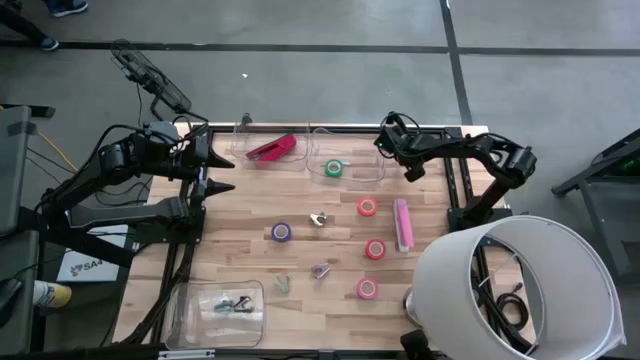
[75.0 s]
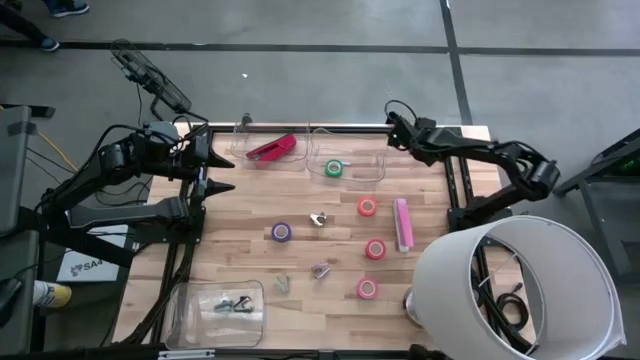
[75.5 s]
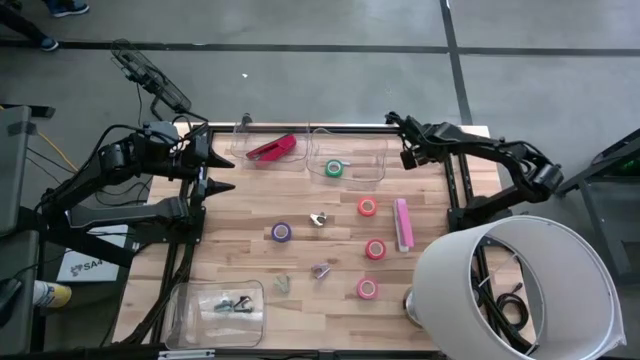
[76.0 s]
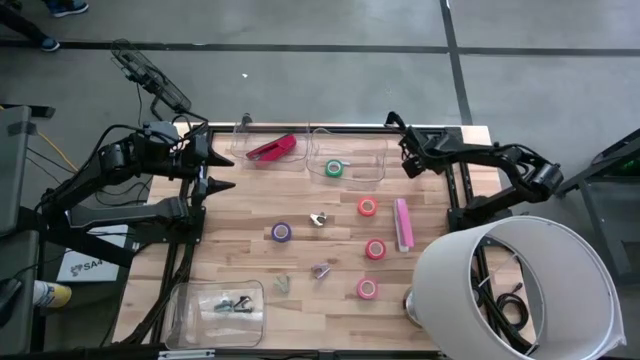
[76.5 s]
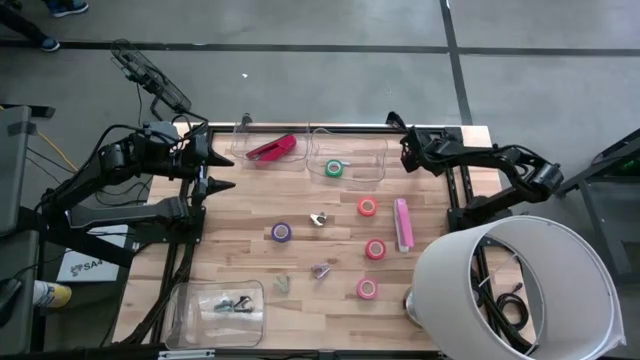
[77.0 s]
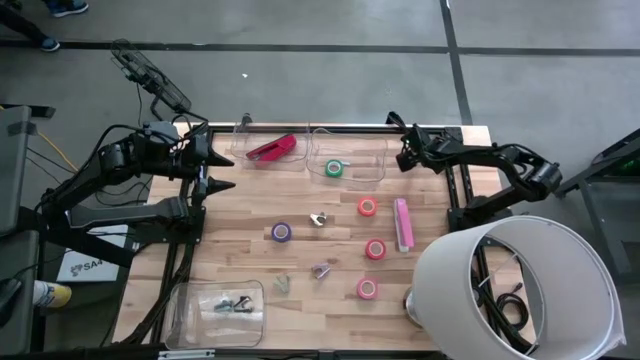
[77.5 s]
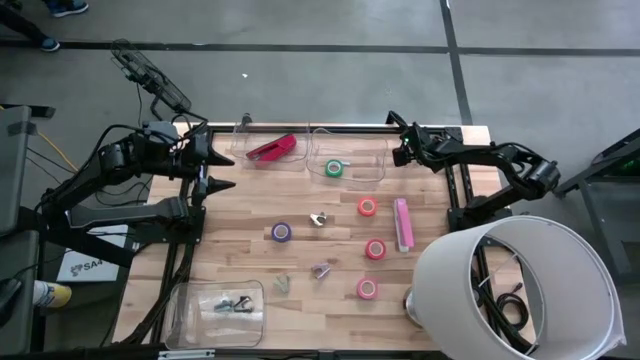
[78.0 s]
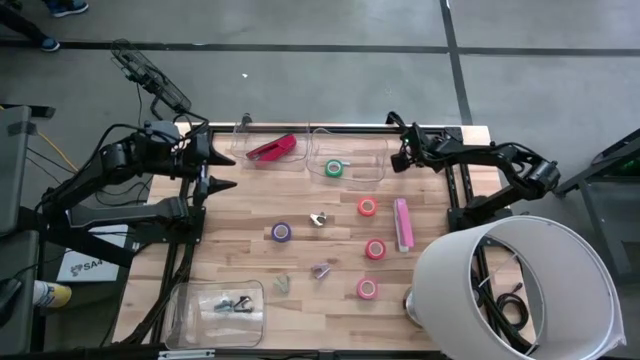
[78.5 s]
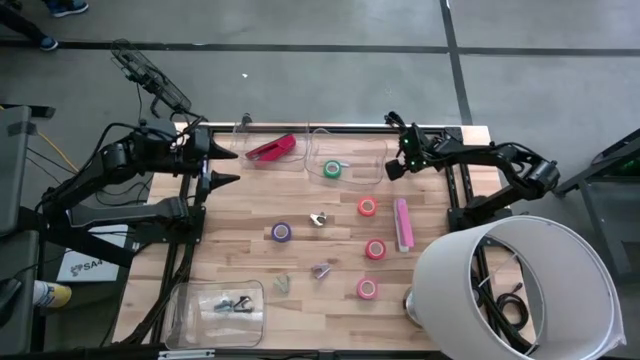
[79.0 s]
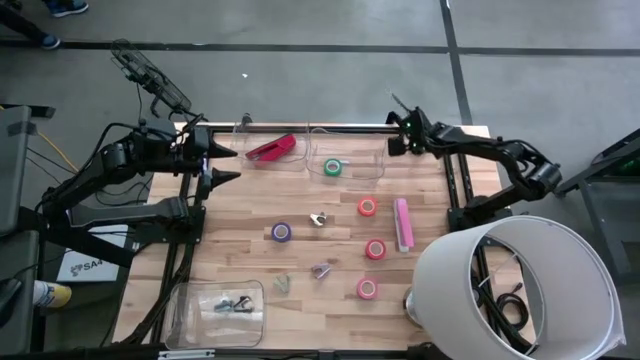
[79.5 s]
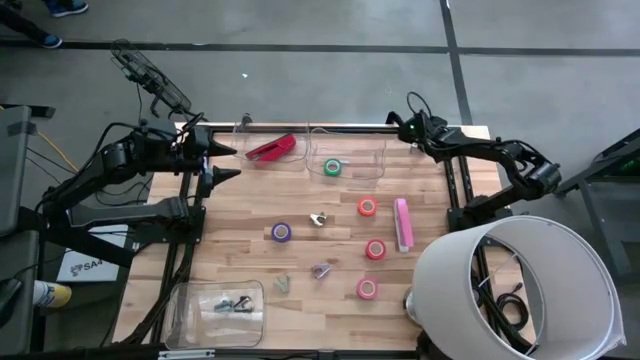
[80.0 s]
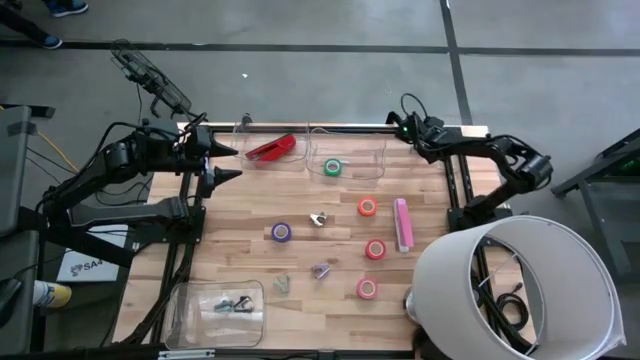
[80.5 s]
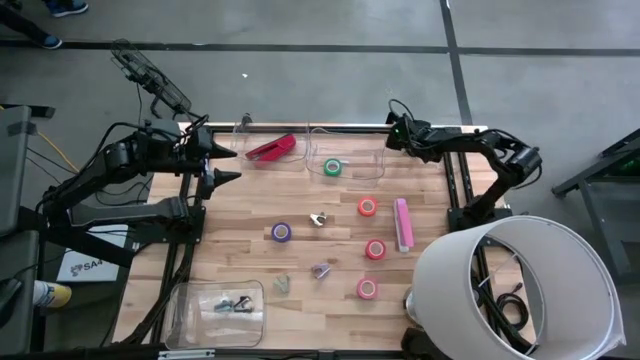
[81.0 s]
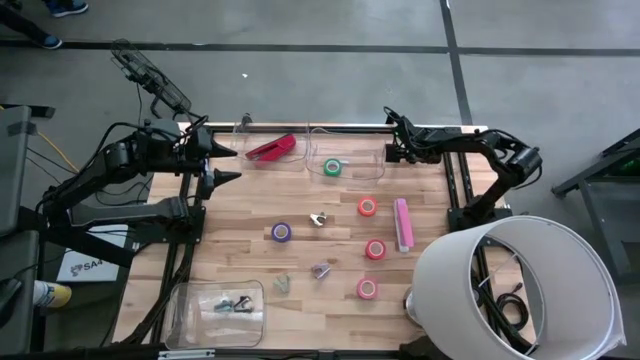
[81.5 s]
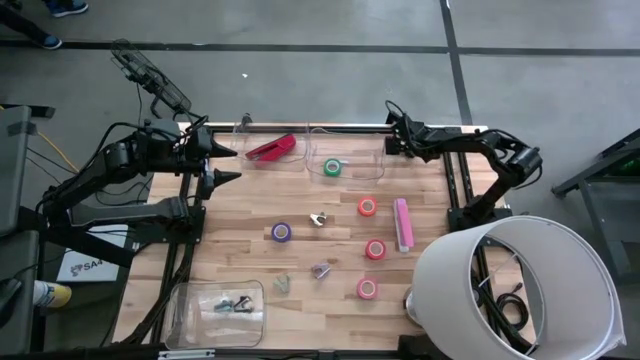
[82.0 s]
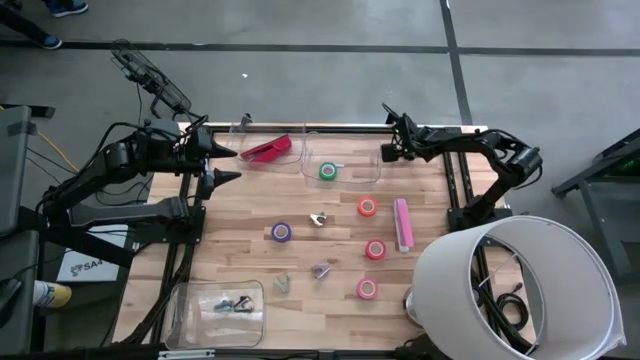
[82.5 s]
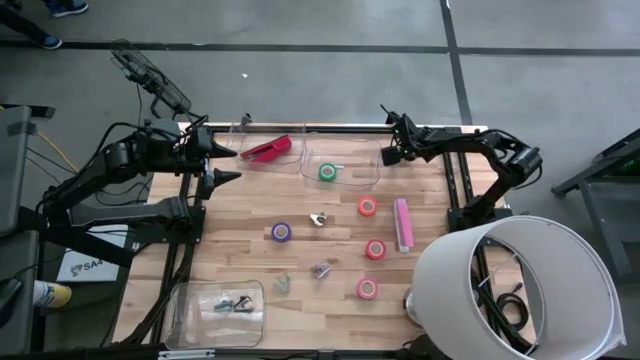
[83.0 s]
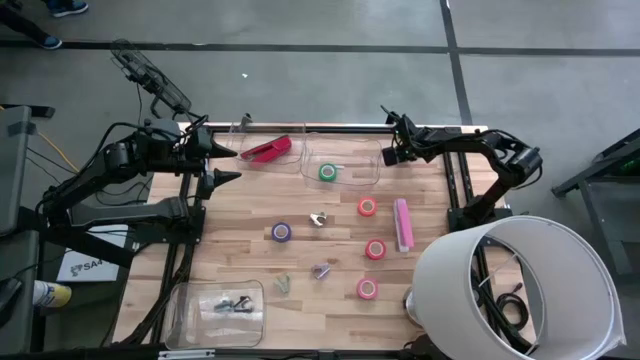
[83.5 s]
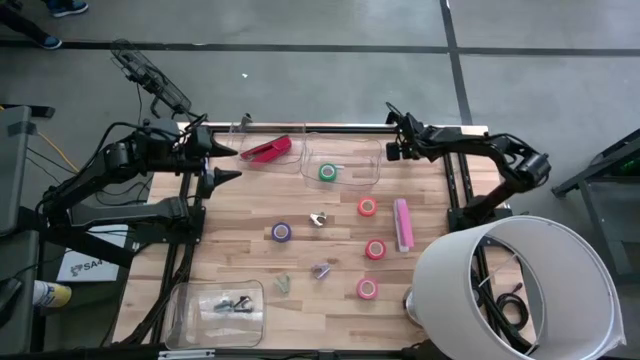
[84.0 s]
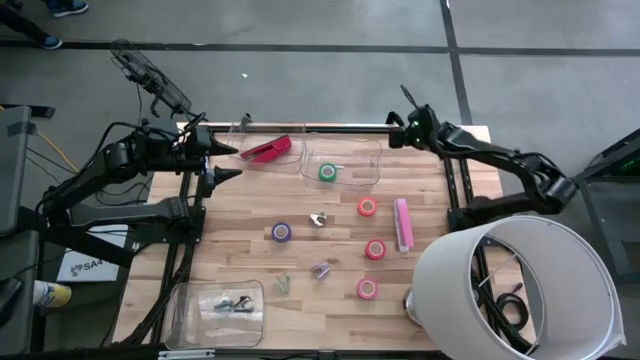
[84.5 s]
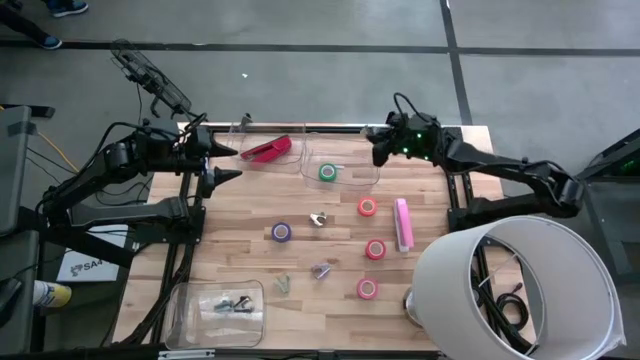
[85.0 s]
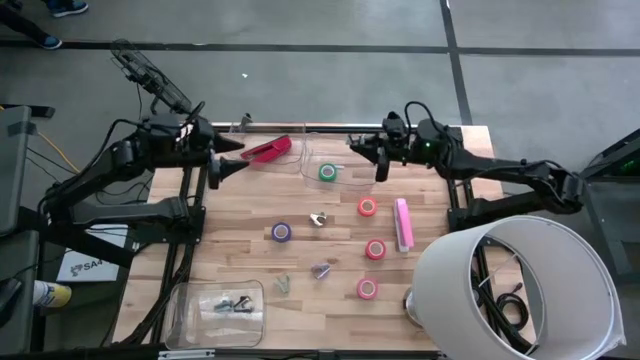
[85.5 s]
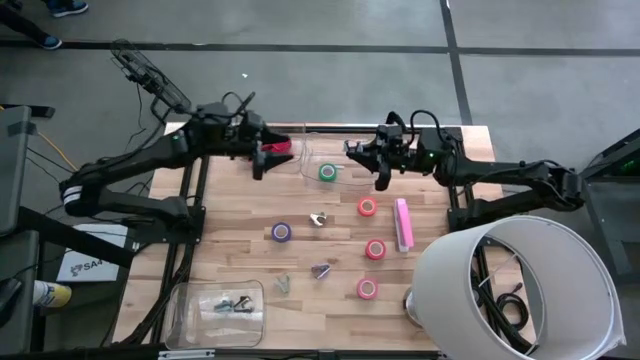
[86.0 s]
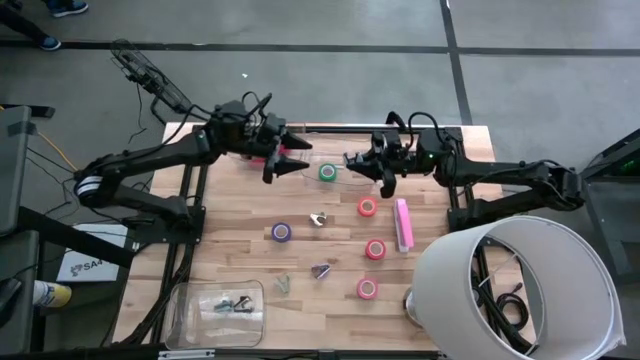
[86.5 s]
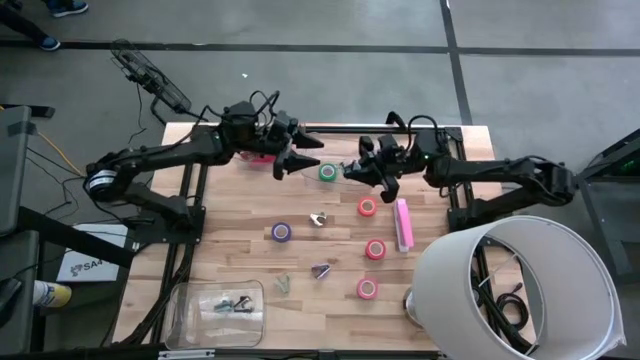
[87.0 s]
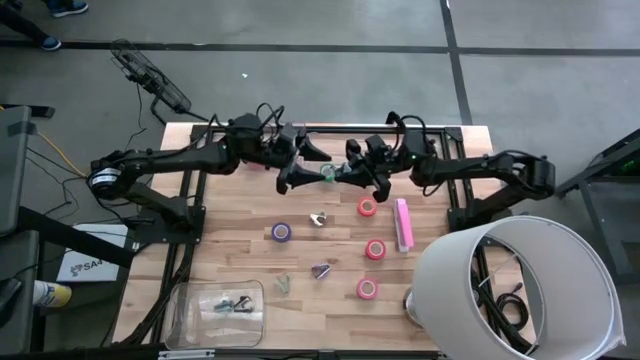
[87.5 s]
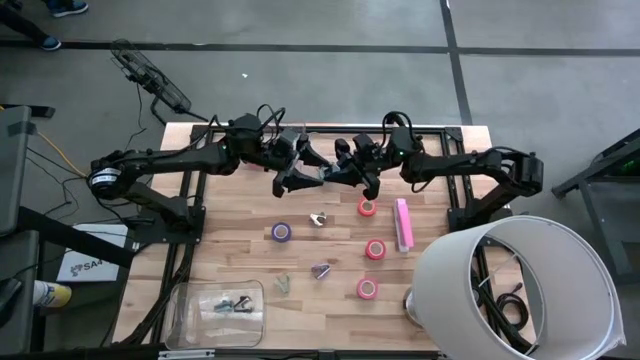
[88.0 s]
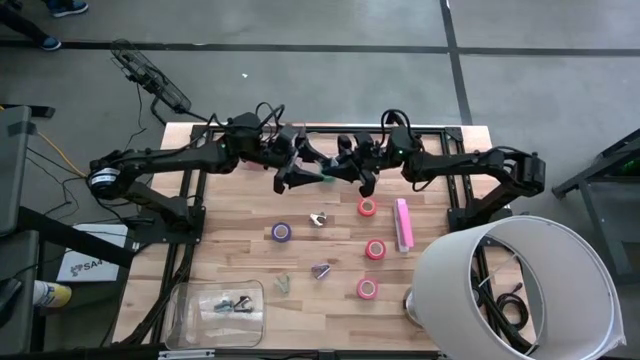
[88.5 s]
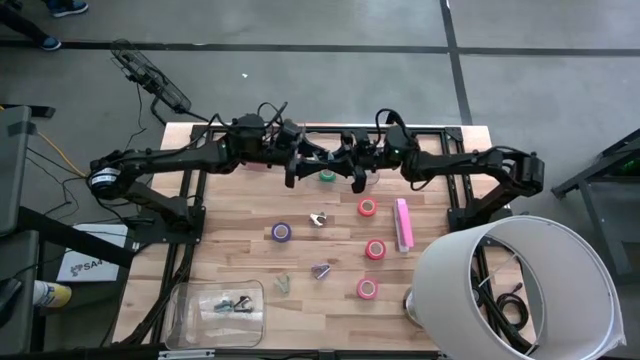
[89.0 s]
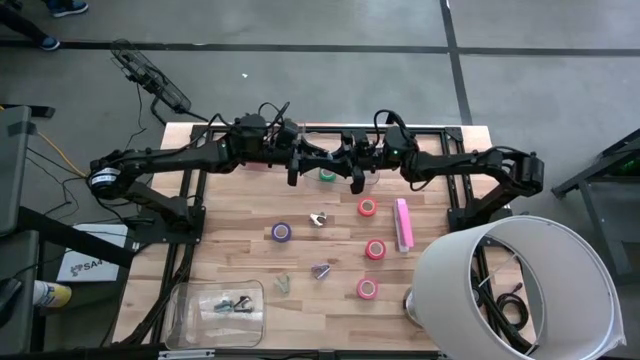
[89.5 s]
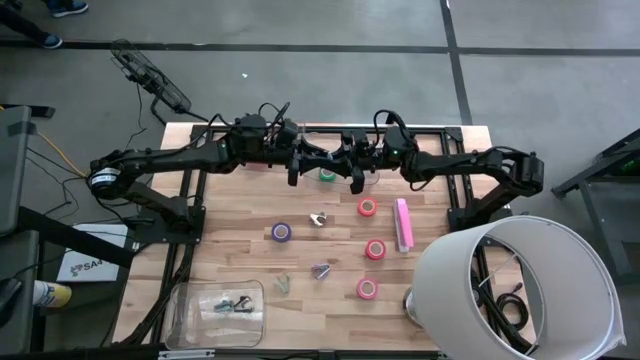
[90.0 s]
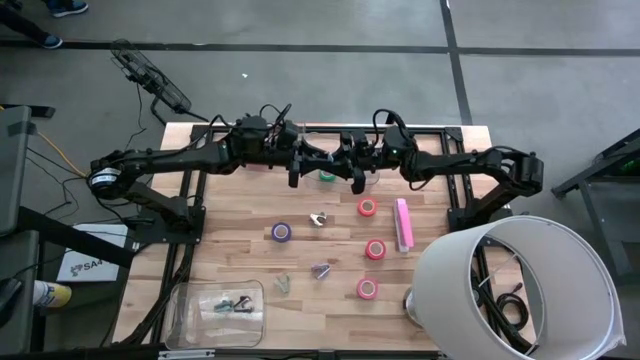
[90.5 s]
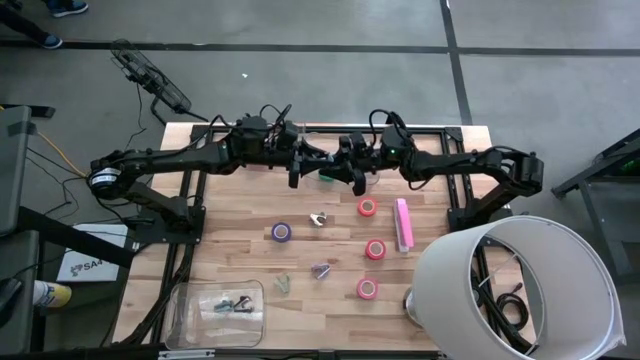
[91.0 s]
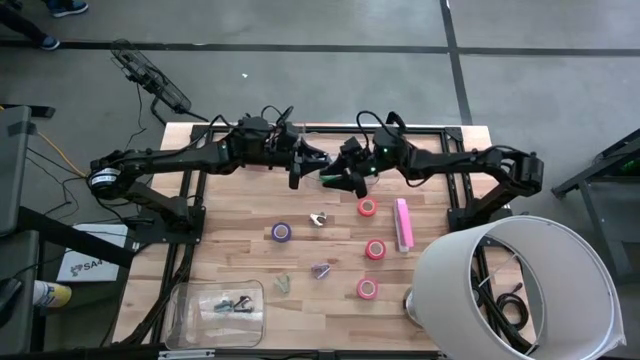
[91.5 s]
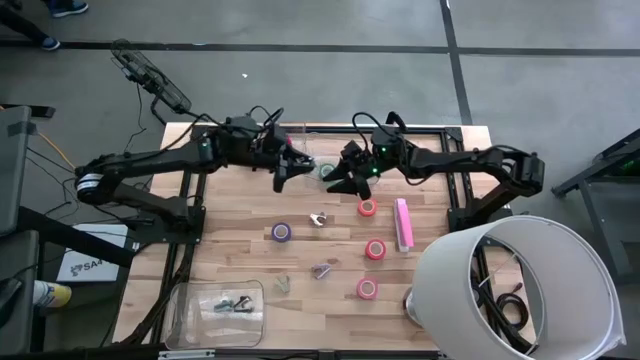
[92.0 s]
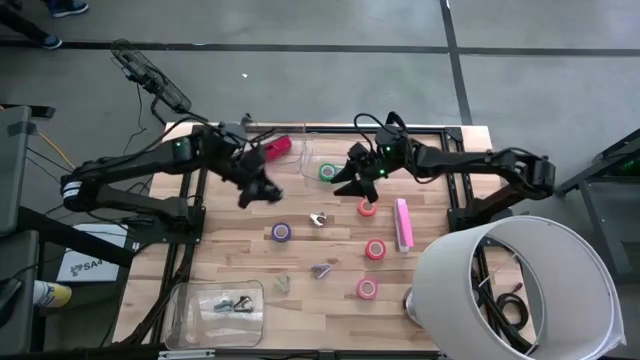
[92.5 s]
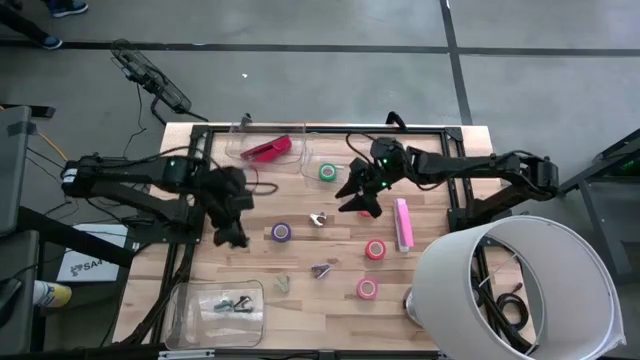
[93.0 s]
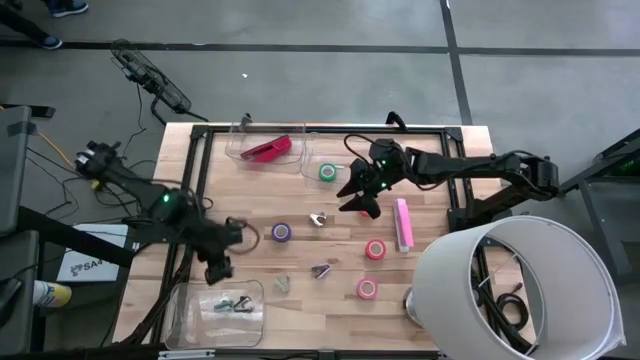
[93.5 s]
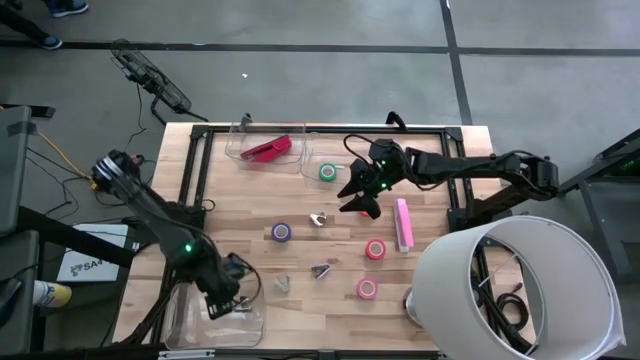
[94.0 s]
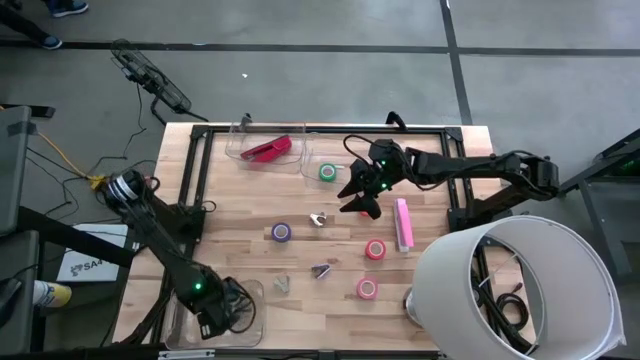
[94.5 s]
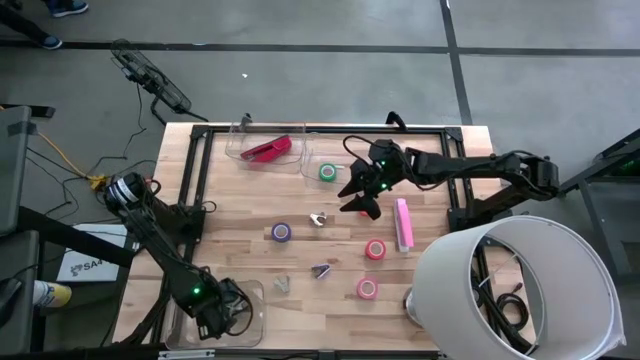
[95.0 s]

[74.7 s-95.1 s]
Task: Pick and place Stapler, Stapler remover, tape
Put the blue stapler remover into the bottom transparent bin

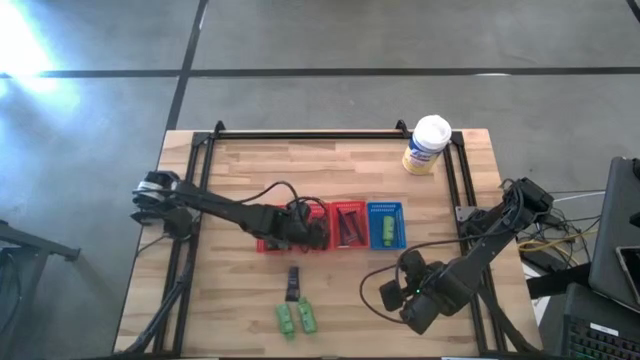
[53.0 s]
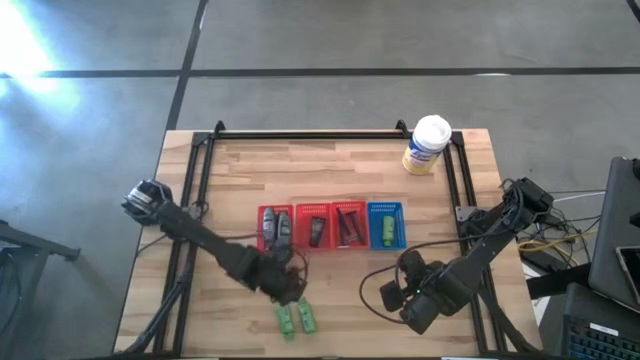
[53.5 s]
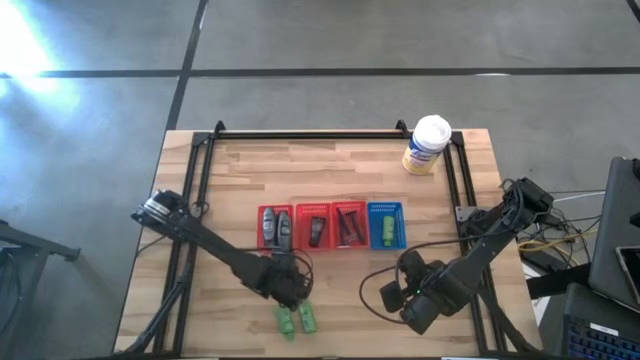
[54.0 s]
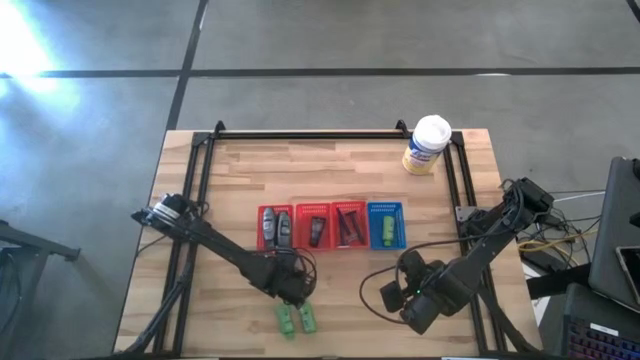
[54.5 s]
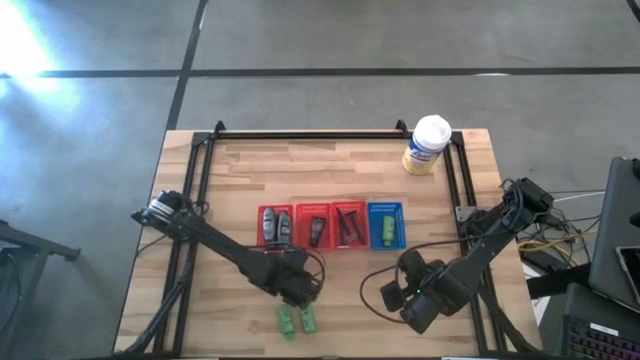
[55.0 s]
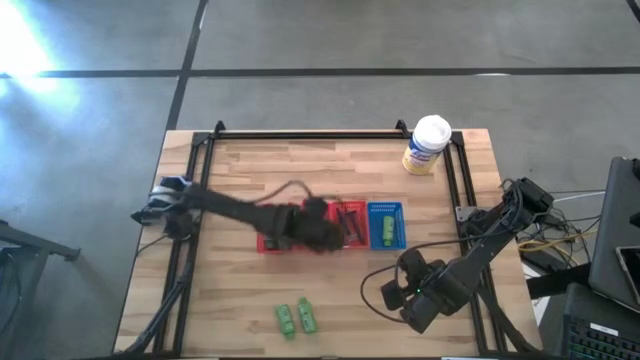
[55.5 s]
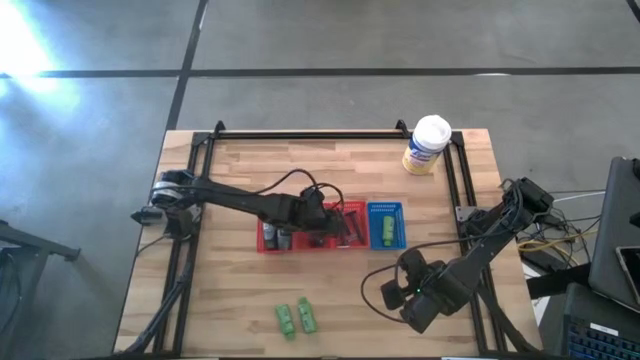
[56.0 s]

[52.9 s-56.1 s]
Task: Pick & Place Travel size toiletries
Put the blue shave cream into the middle red bin
